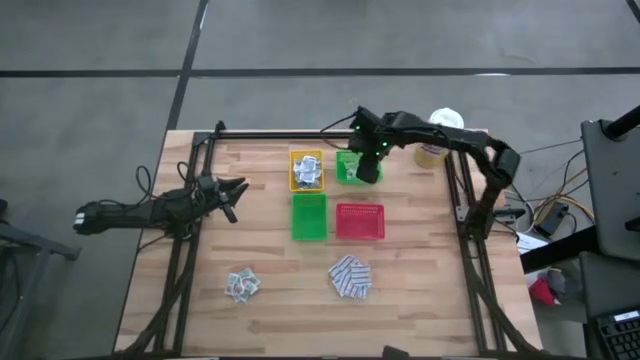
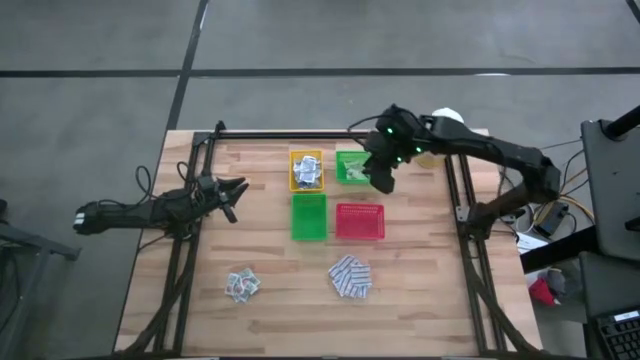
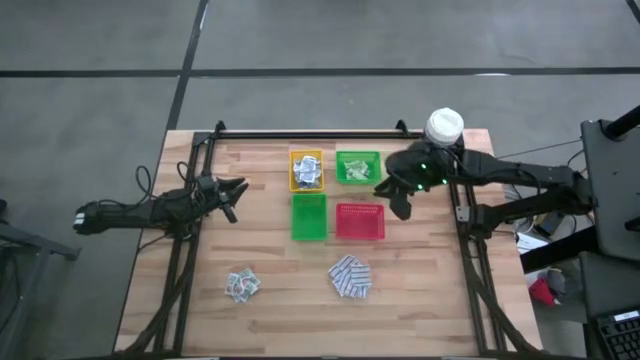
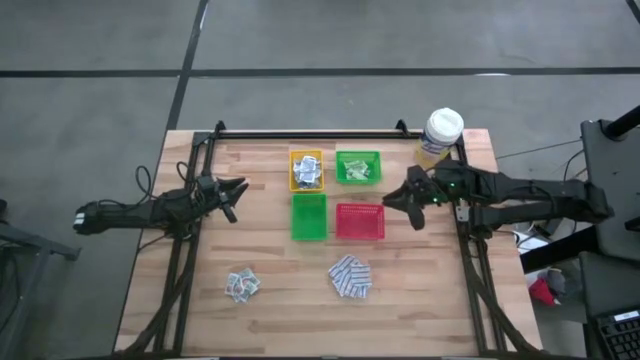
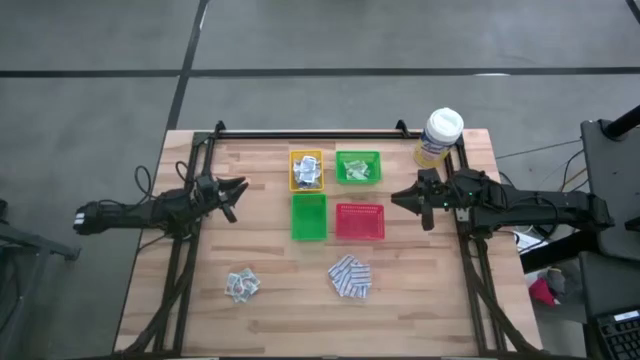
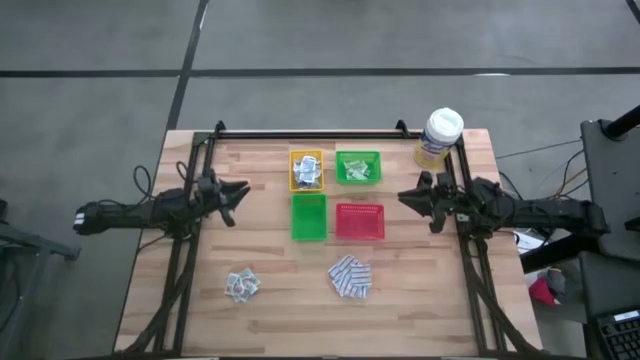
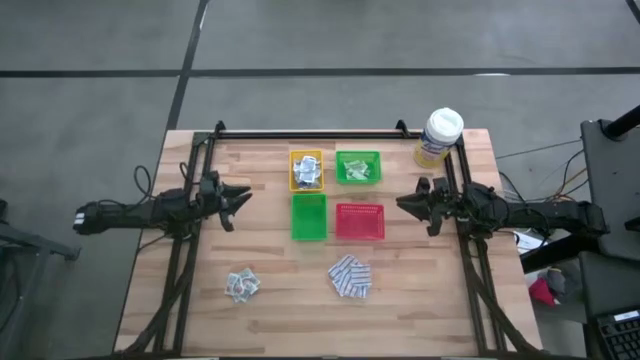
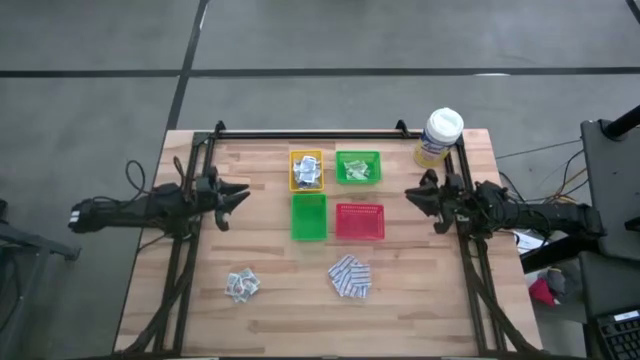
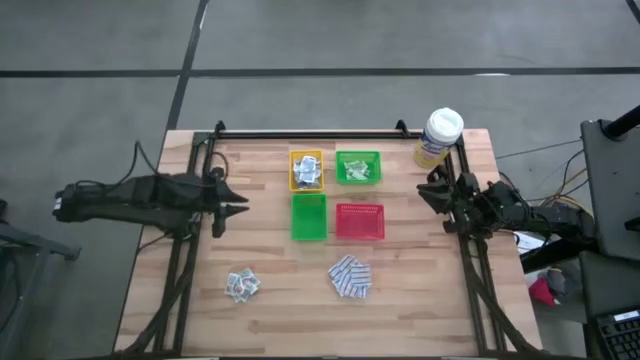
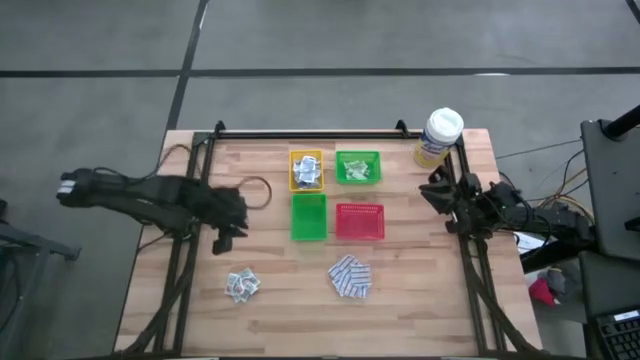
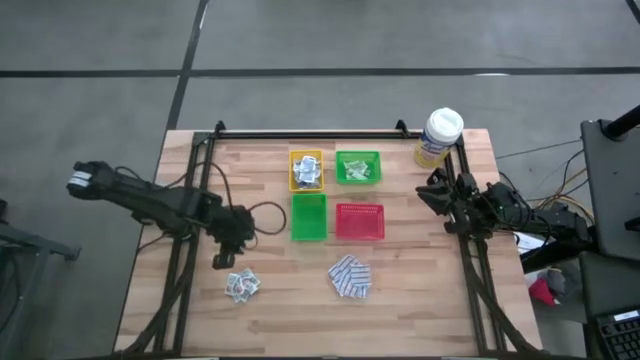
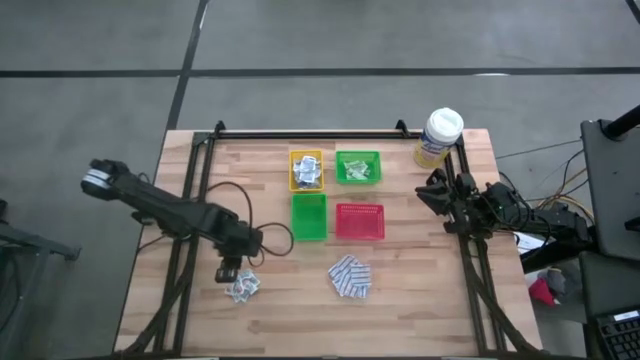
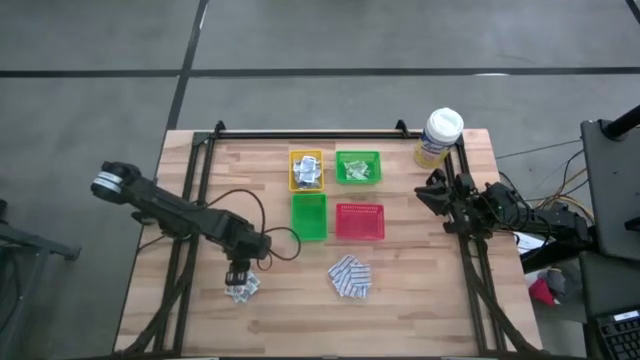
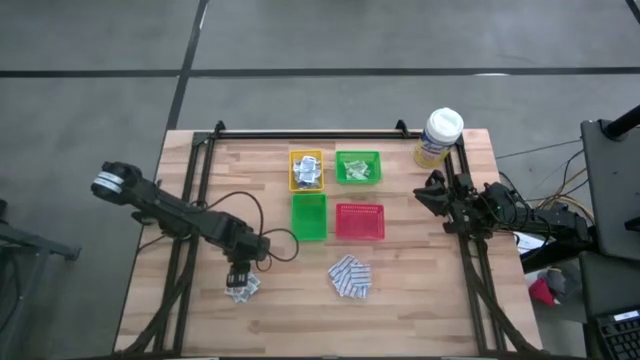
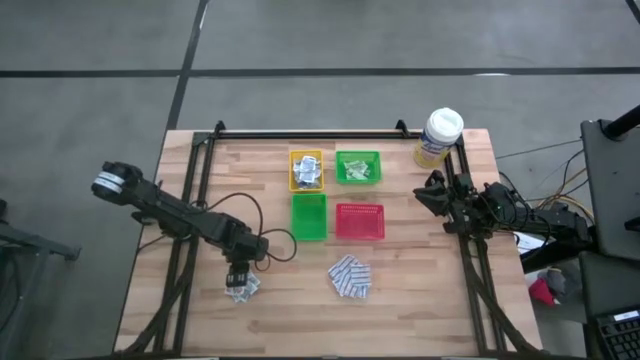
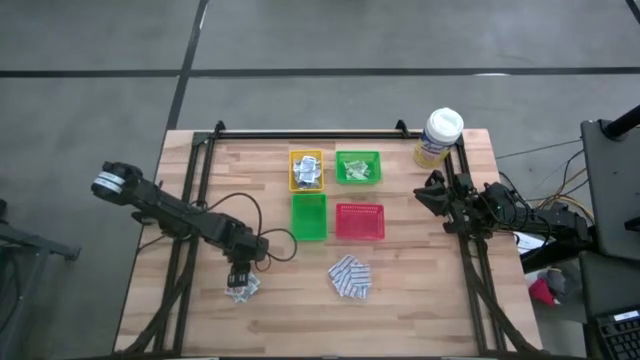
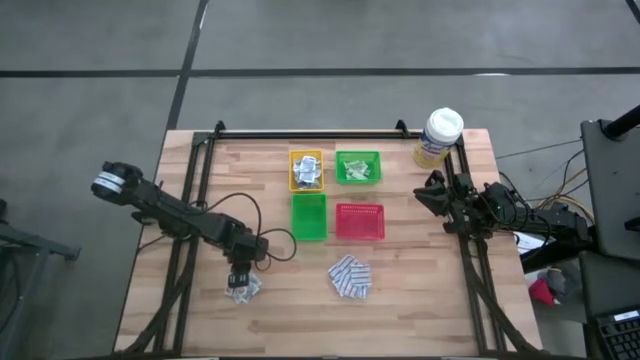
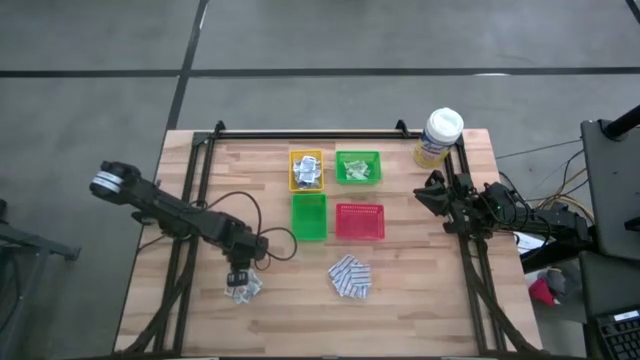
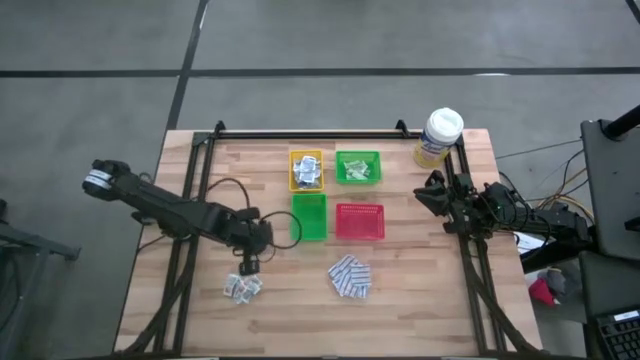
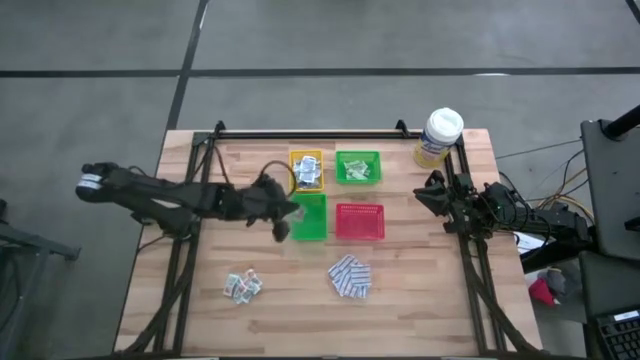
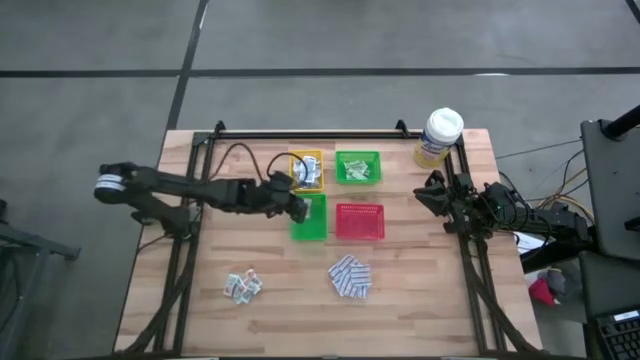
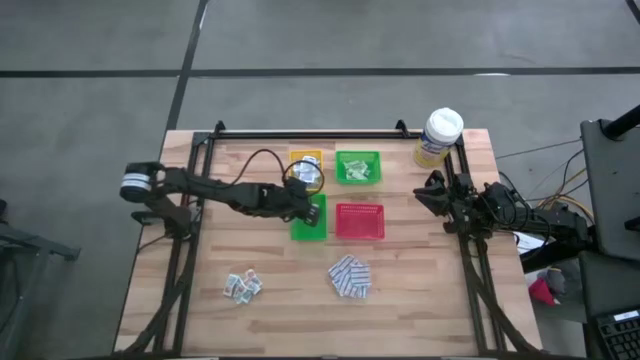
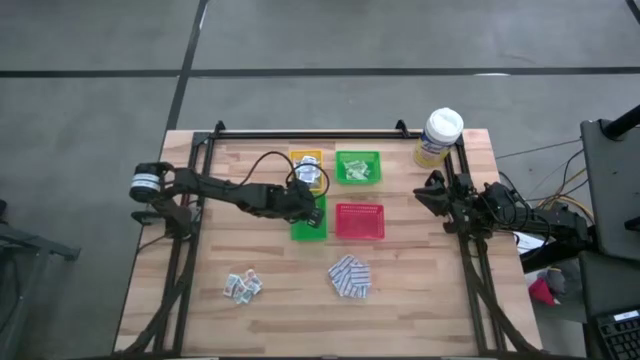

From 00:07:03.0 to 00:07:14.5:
Task: Pick & Place First Aid Supplies
Put the orange ointment pack into the bottom green bin

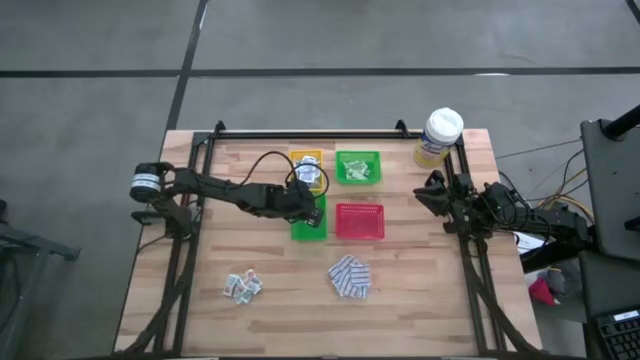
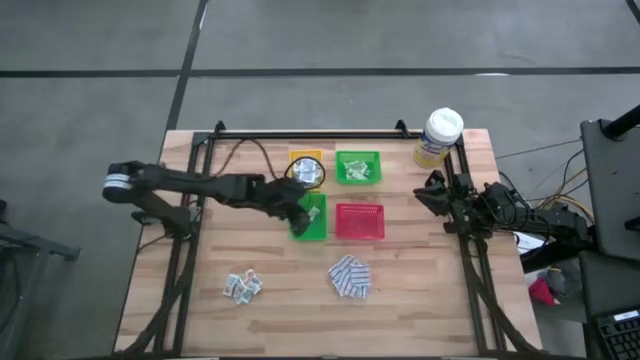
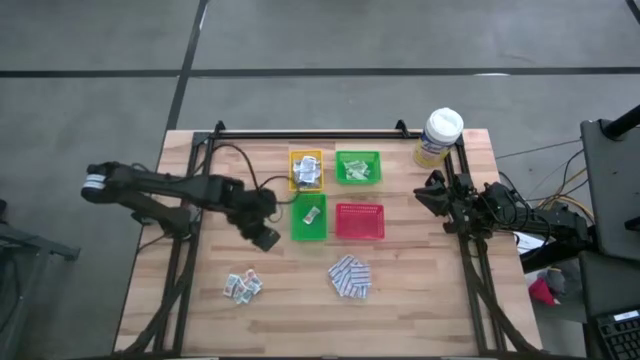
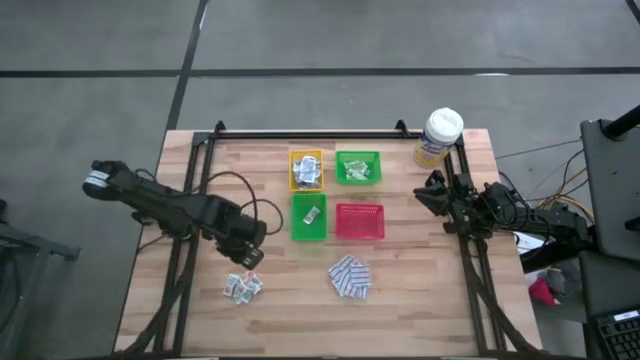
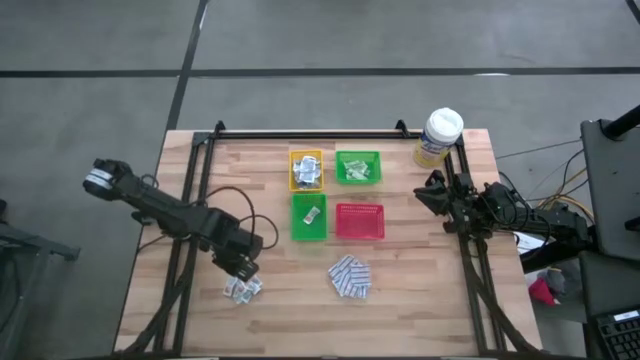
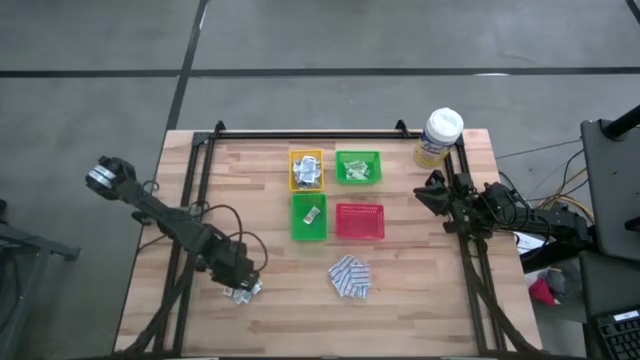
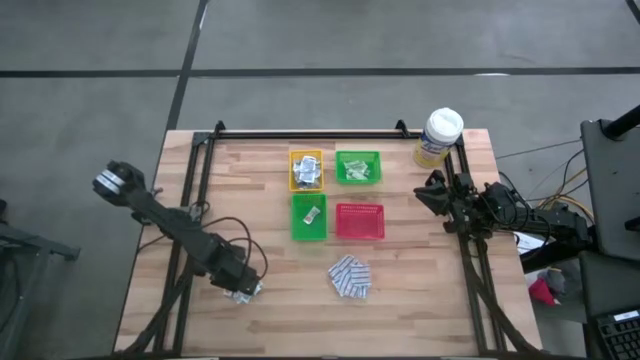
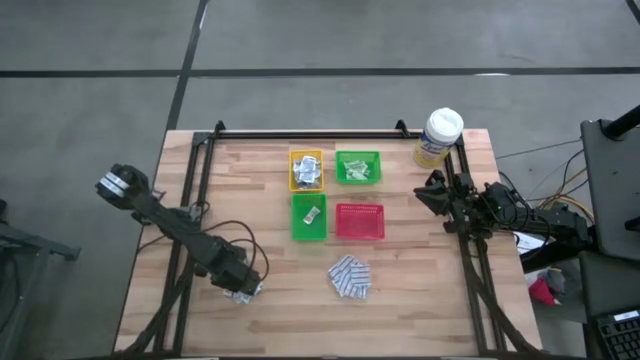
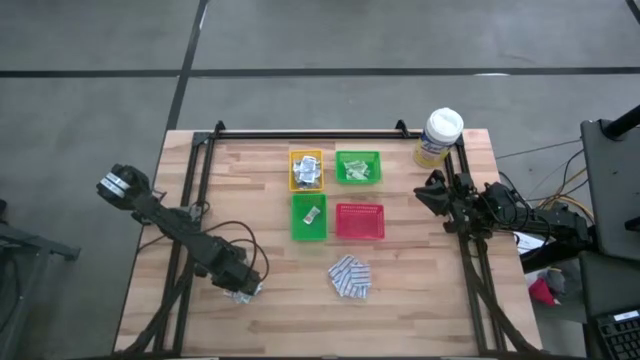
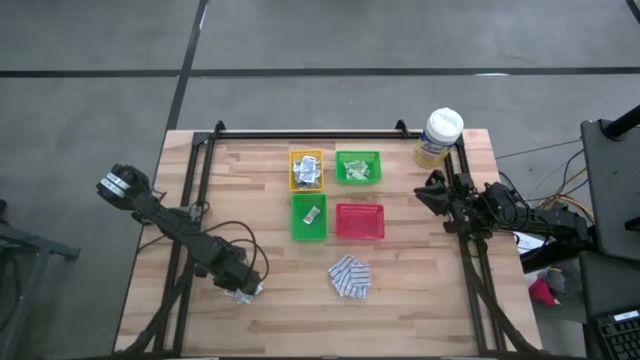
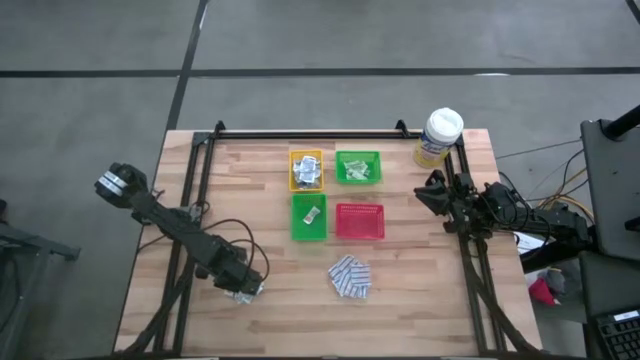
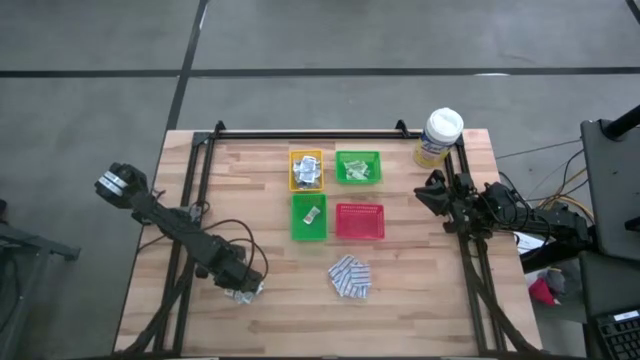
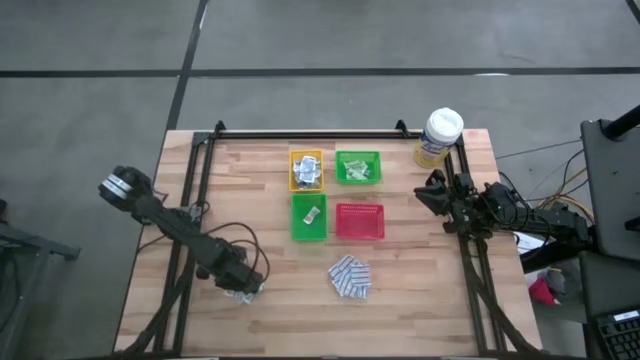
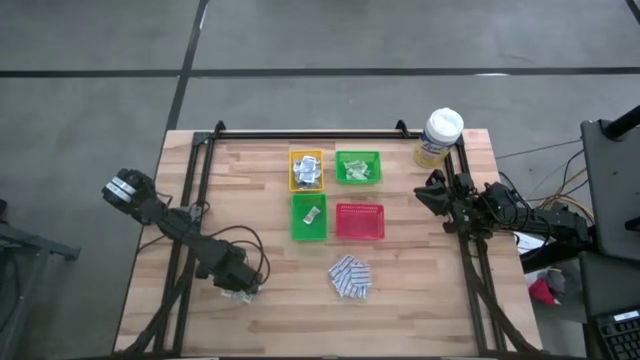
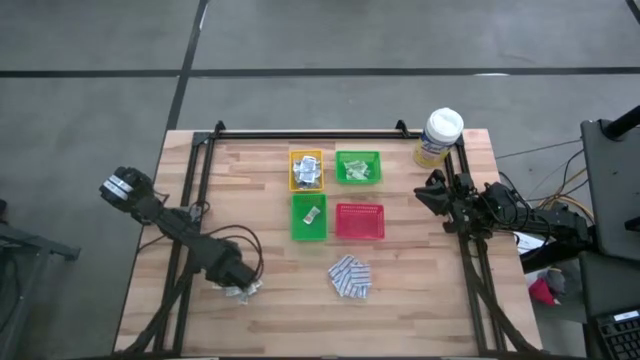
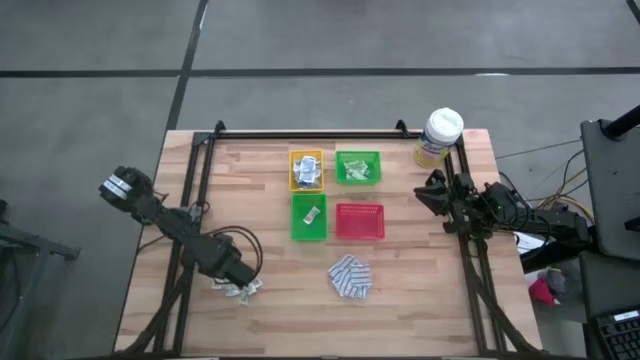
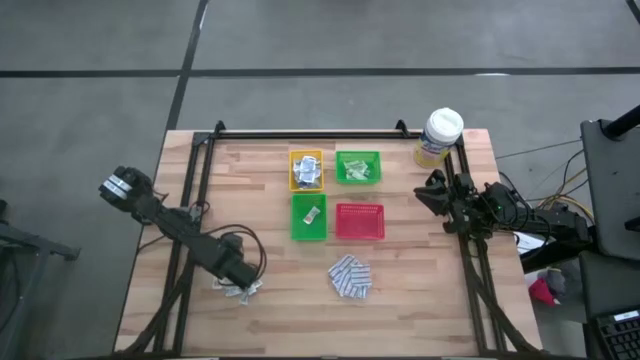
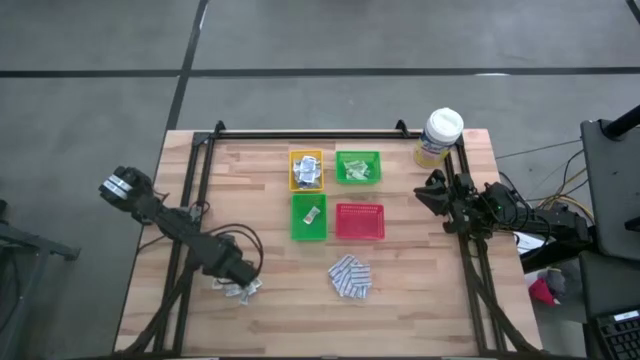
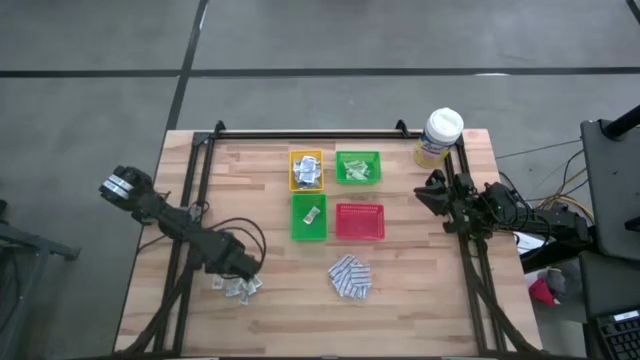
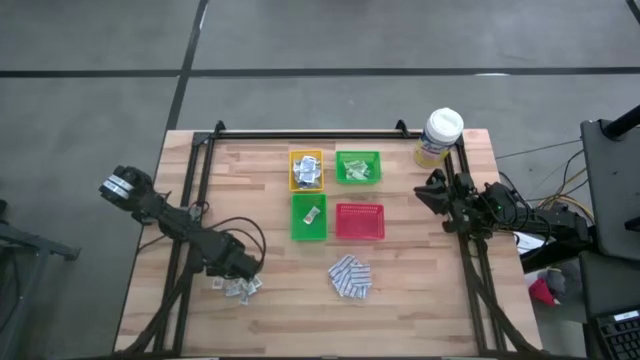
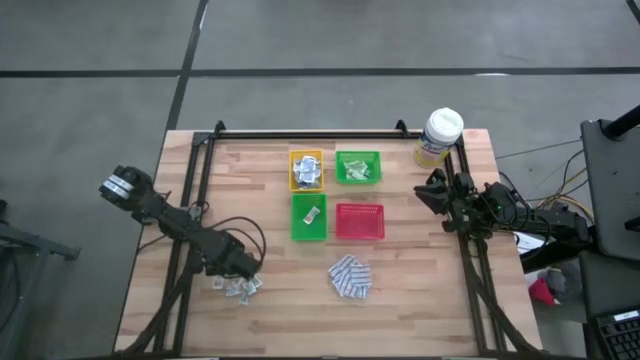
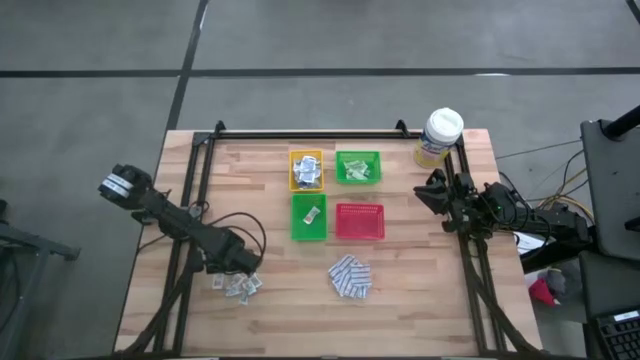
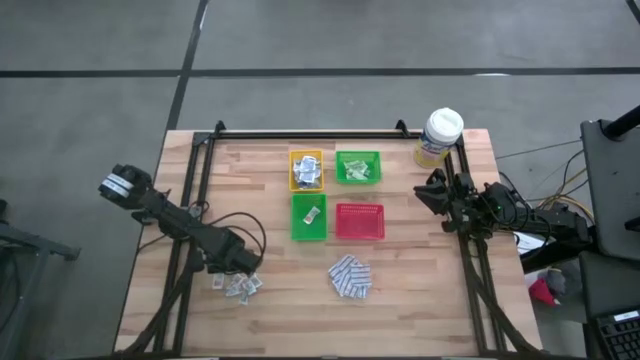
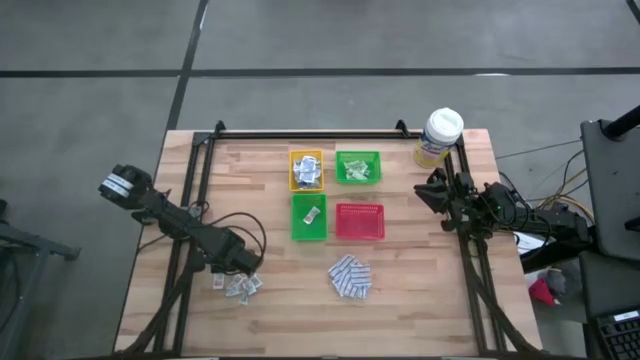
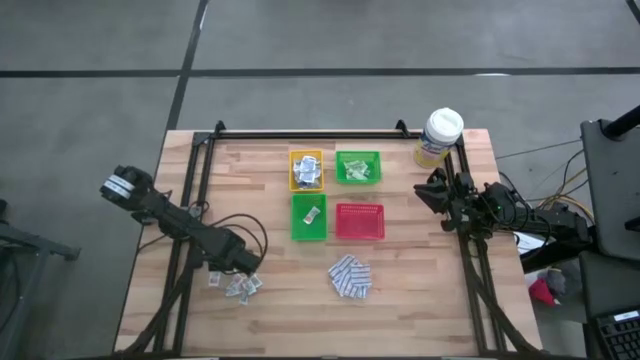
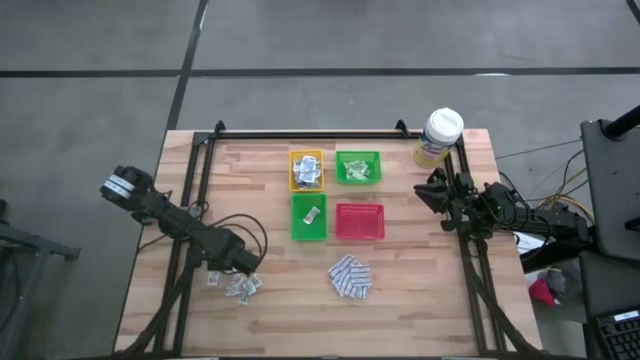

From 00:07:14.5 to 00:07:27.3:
Put the orange ointment pack into the bottom green bin
